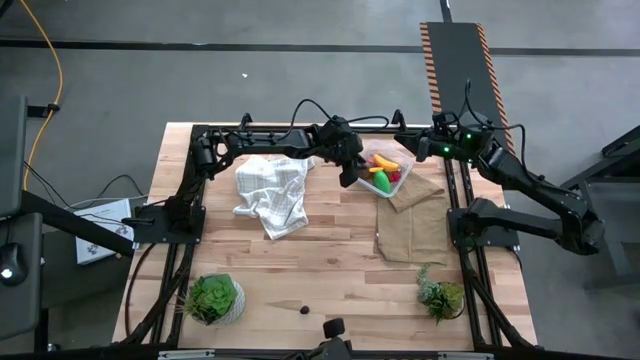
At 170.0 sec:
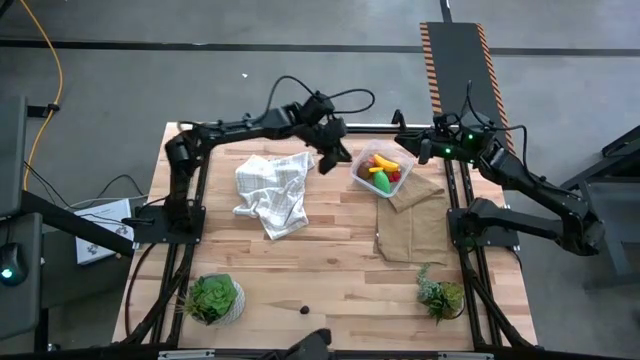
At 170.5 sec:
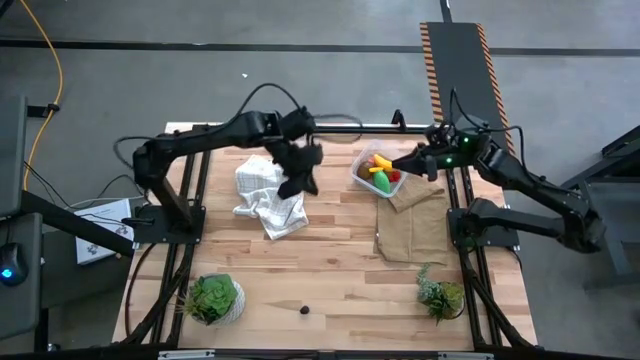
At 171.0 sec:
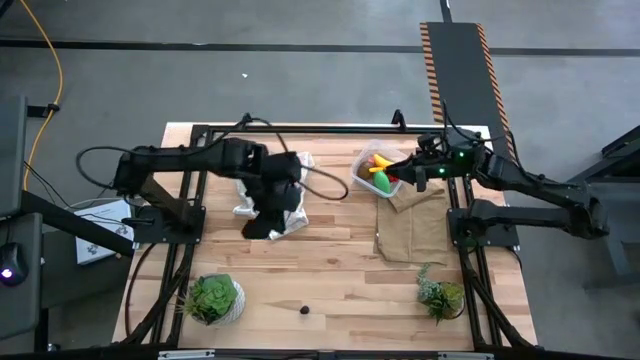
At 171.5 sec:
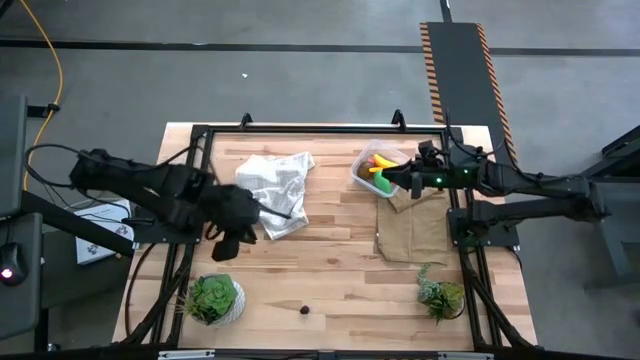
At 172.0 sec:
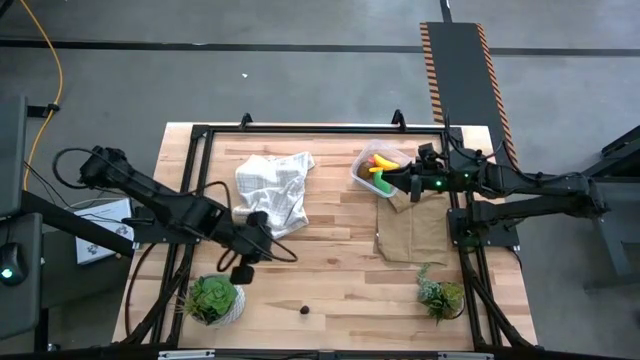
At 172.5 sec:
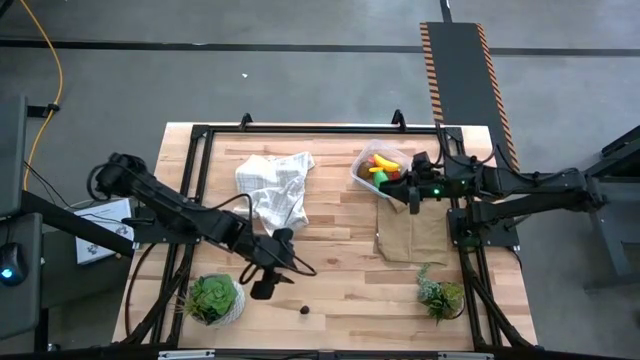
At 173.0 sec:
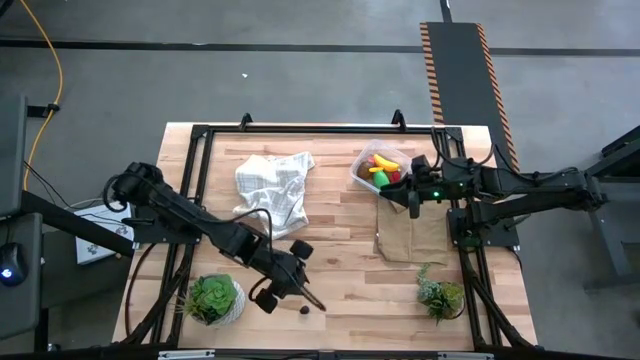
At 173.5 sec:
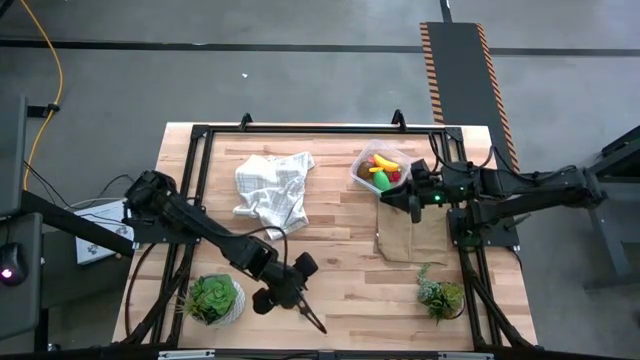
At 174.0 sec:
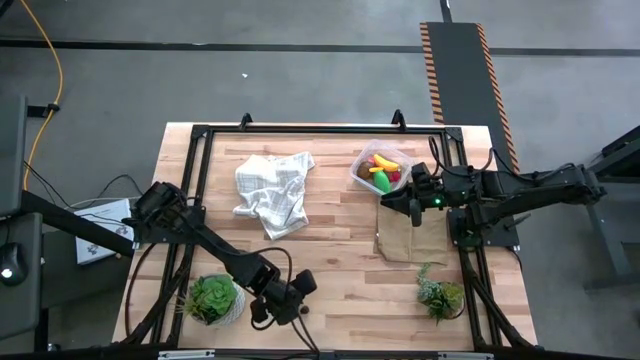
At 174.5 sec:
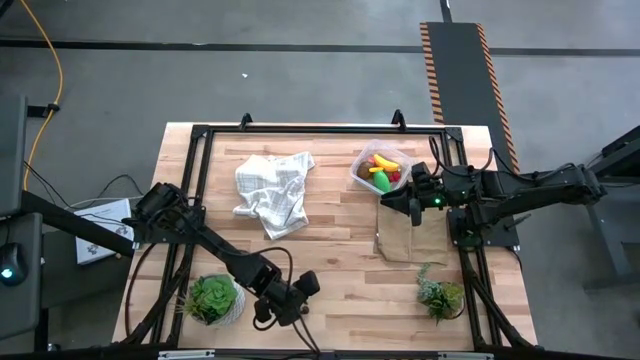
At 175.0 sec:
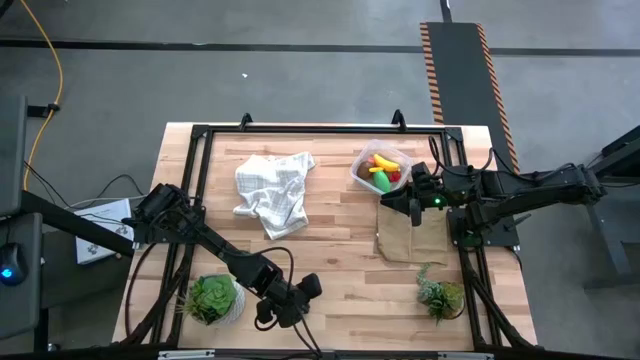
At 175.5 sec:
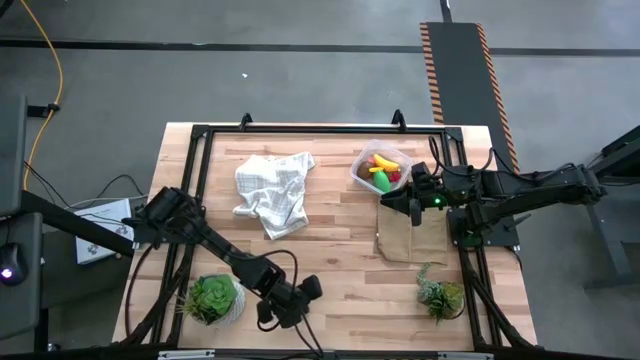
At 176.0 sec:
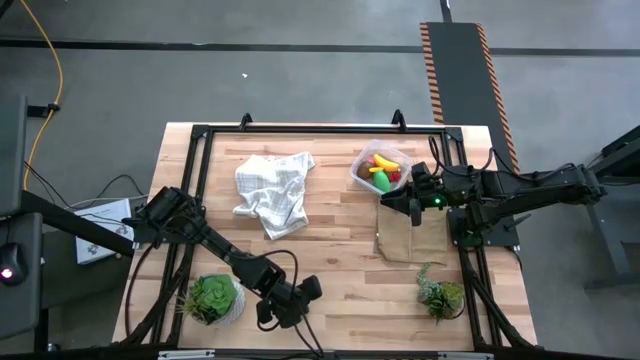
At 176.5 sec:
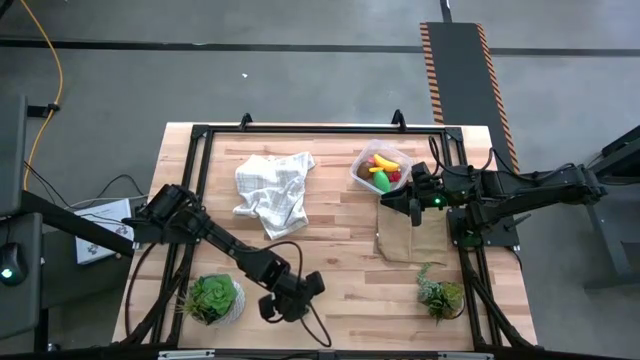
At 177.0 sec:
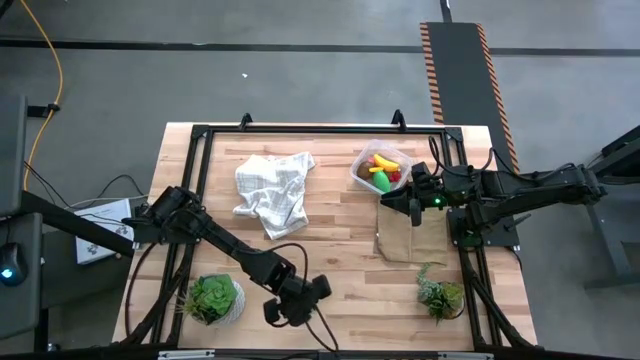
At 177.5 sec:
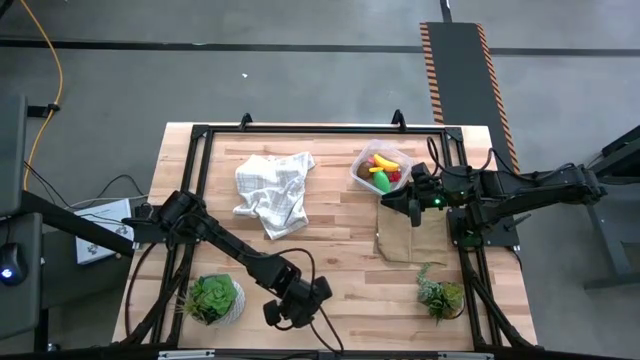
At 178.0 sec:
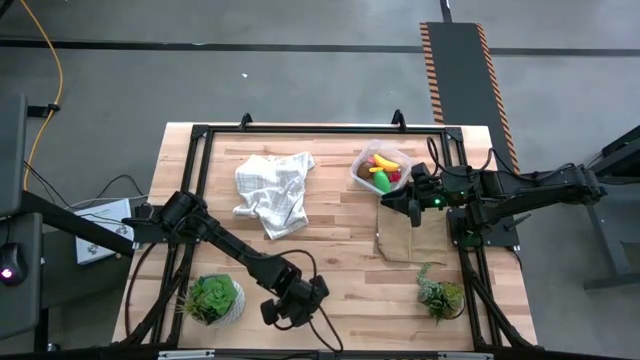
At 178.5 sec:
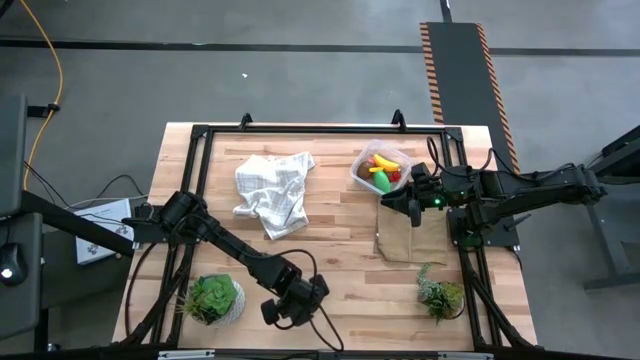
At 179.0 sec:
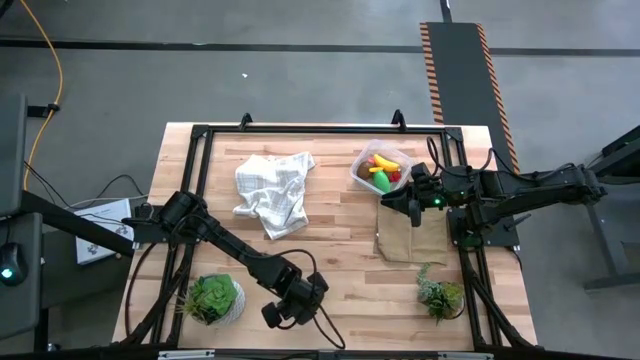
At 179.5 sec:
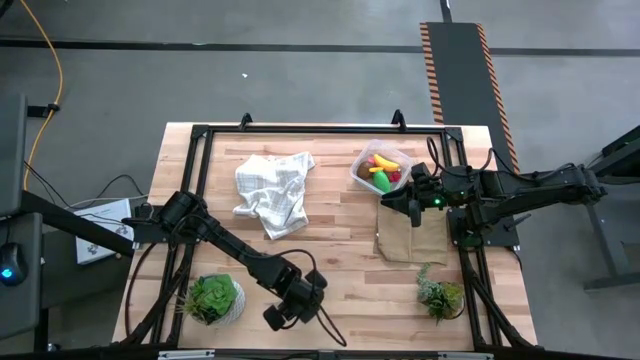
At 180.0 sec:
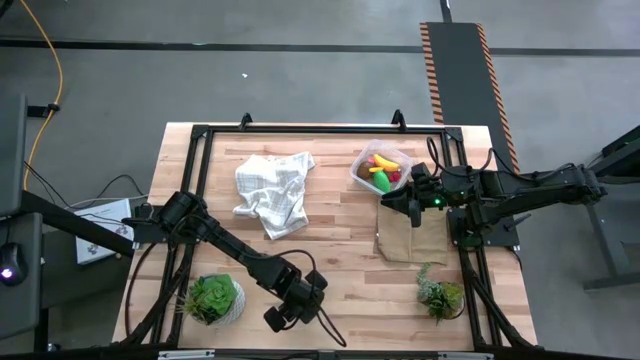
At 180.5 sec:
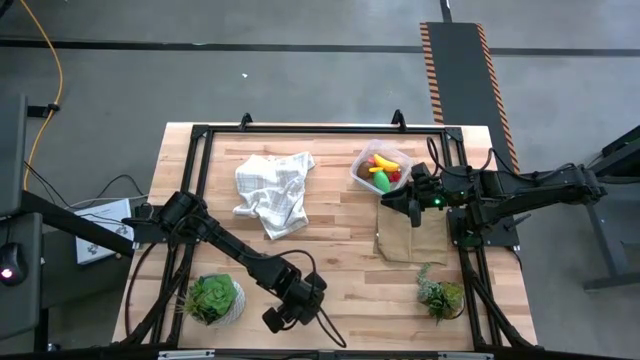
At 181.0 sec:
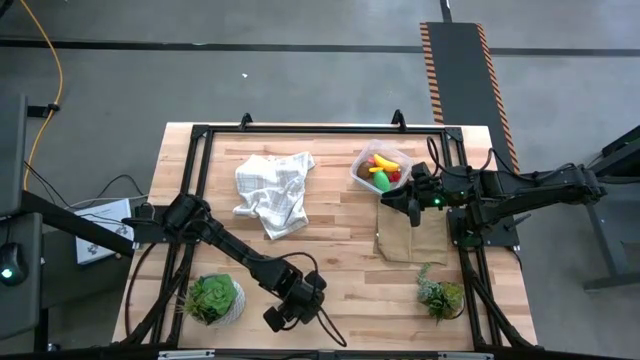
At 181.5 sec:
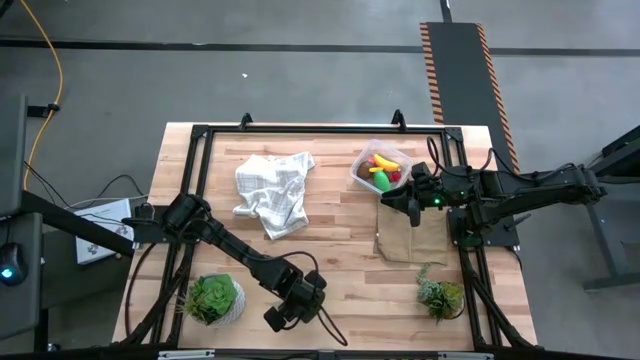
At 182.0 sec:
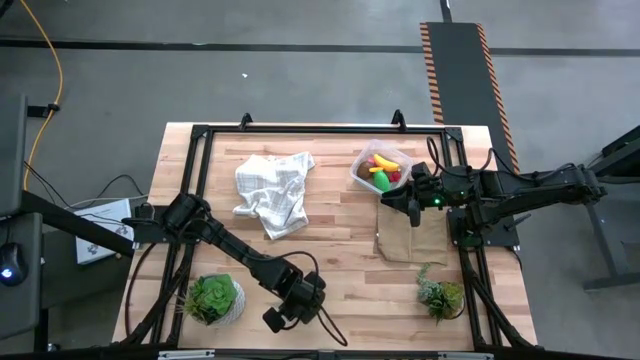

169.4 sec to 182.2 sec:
Task: Pick and placing Produce into tupperware
Put the blackberry into the transparent bin
